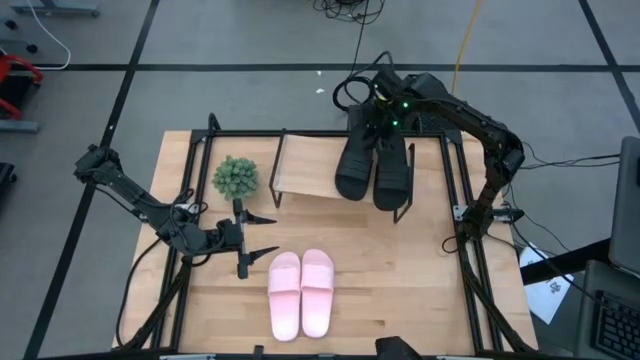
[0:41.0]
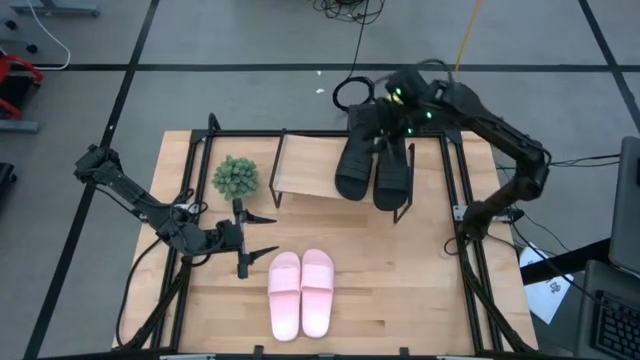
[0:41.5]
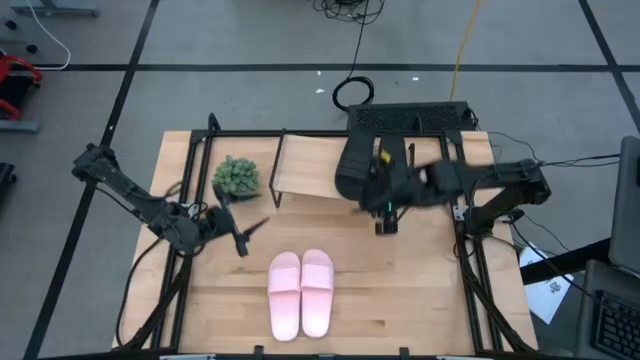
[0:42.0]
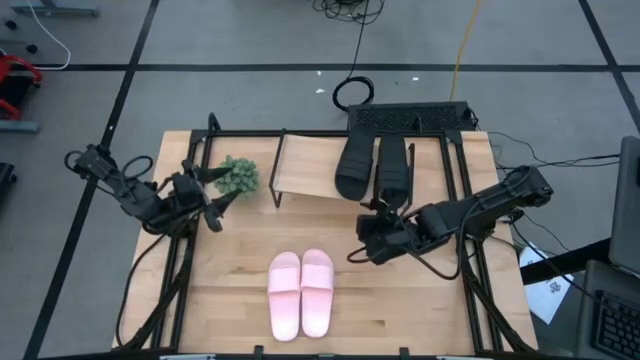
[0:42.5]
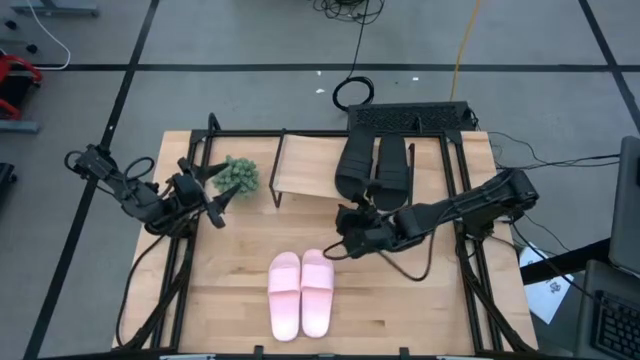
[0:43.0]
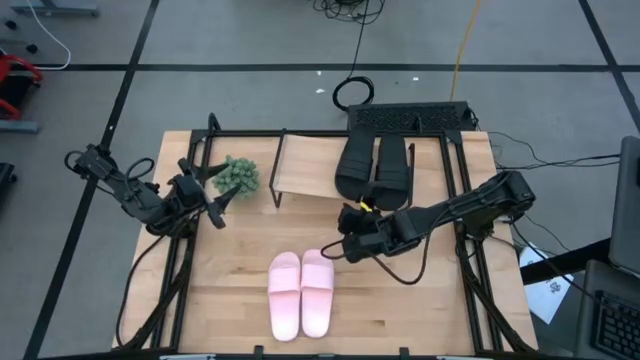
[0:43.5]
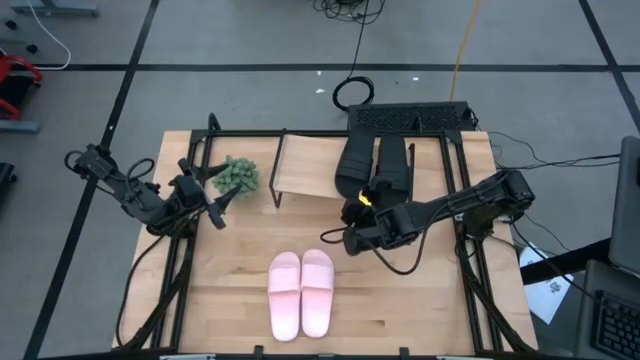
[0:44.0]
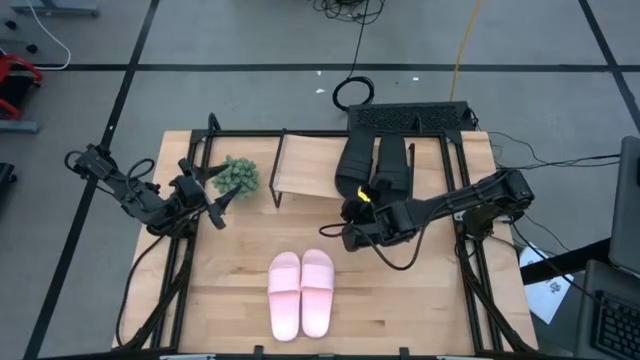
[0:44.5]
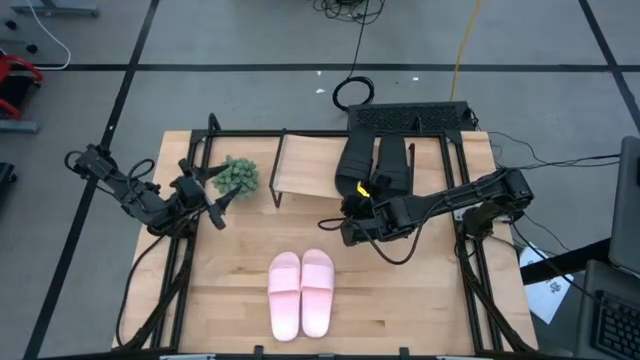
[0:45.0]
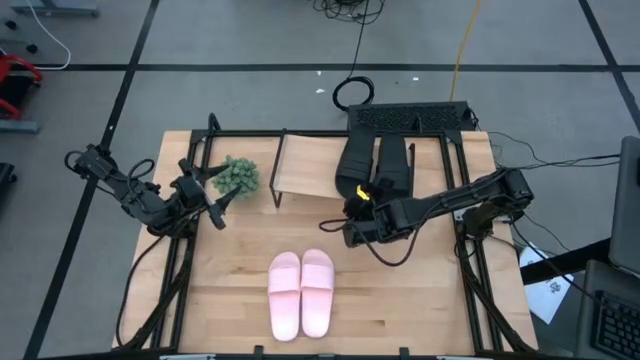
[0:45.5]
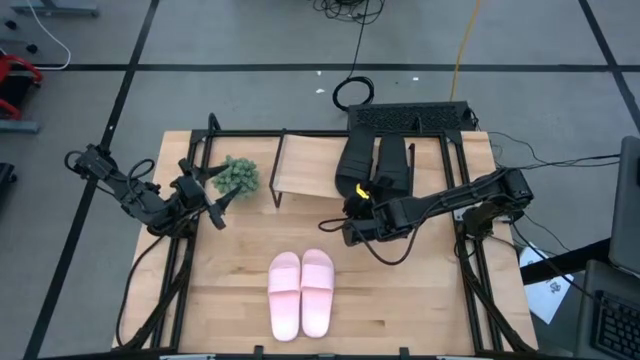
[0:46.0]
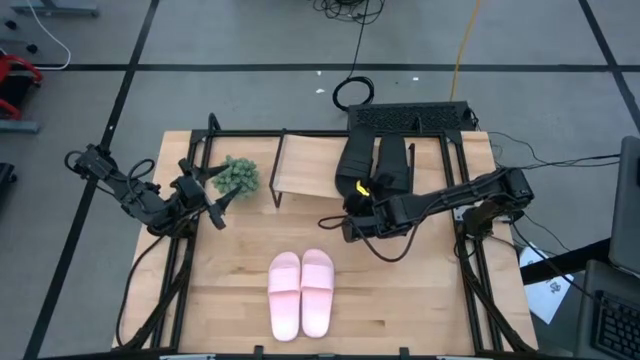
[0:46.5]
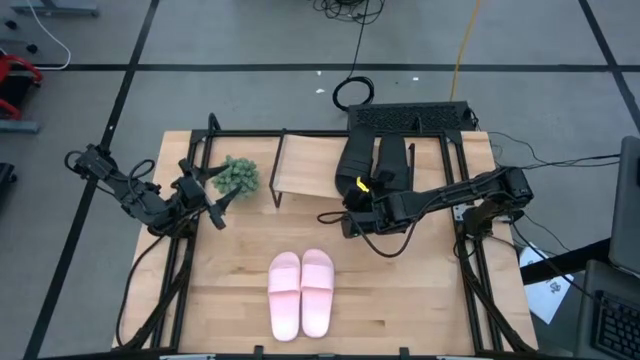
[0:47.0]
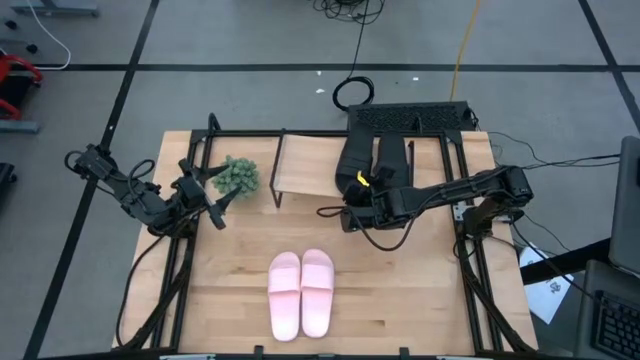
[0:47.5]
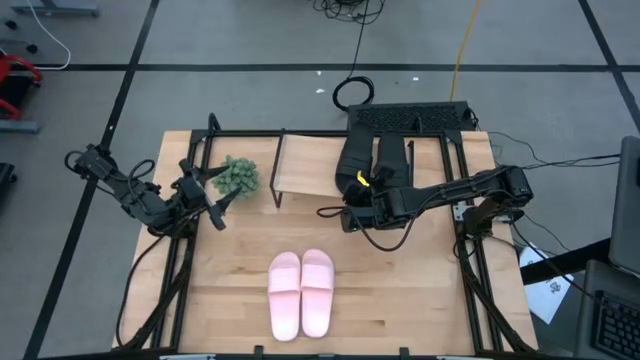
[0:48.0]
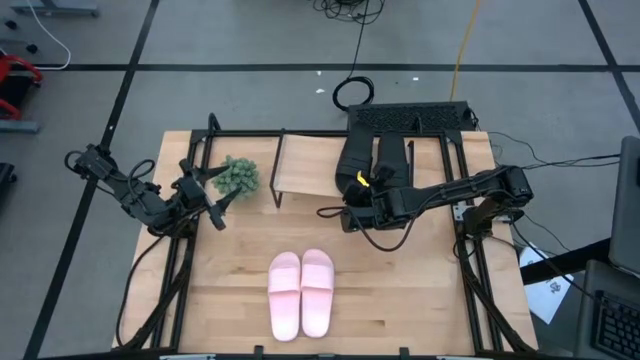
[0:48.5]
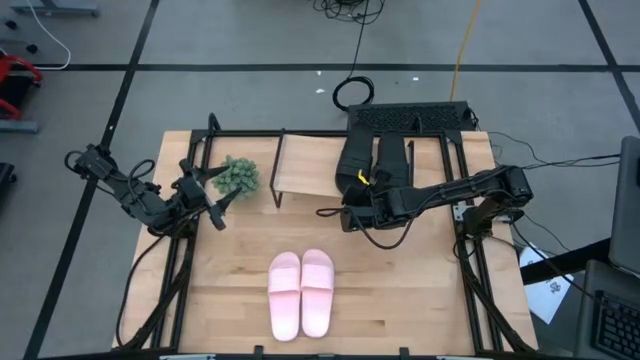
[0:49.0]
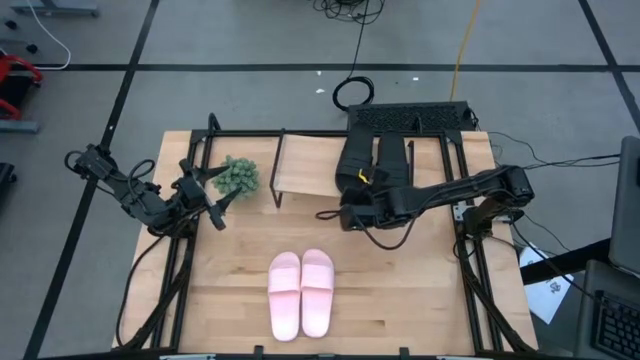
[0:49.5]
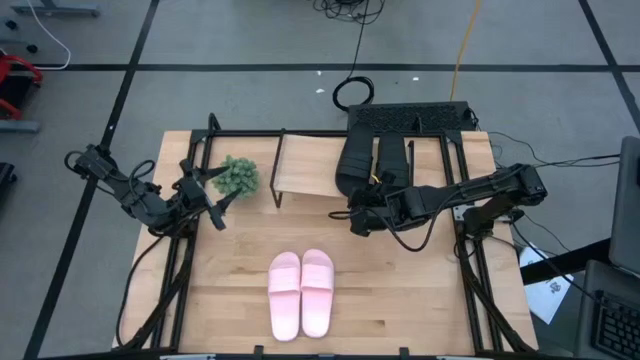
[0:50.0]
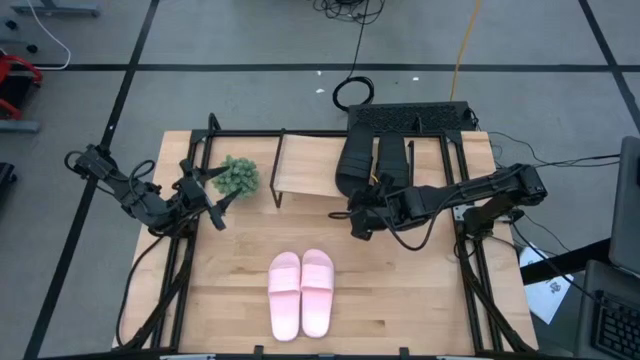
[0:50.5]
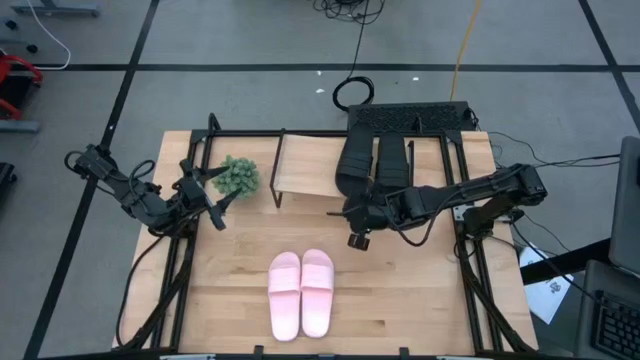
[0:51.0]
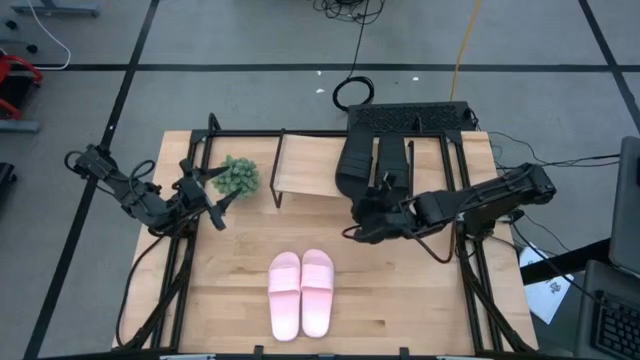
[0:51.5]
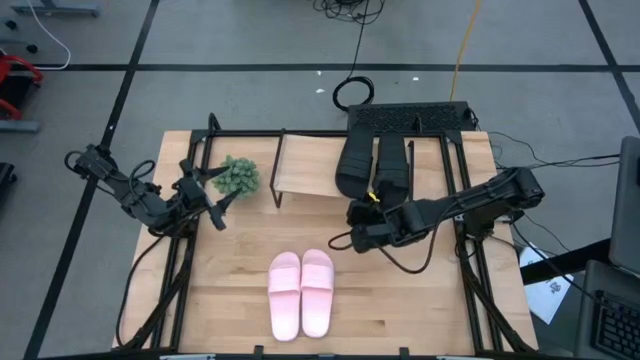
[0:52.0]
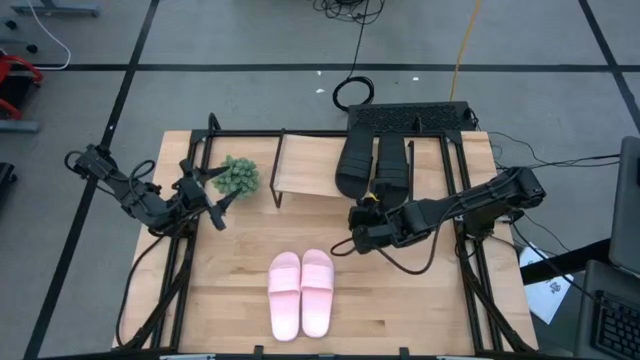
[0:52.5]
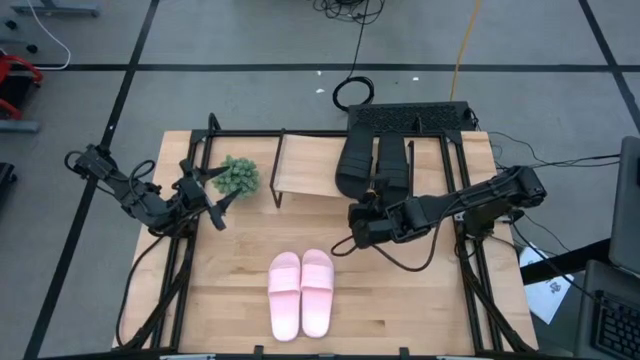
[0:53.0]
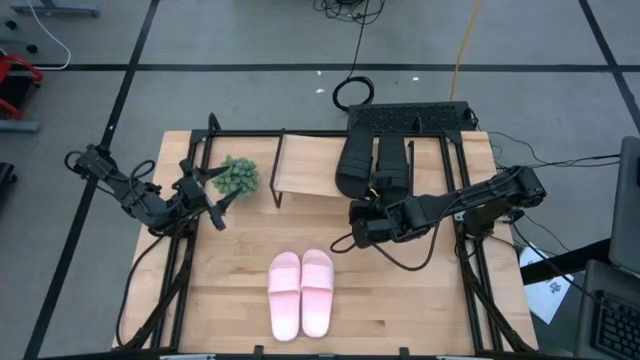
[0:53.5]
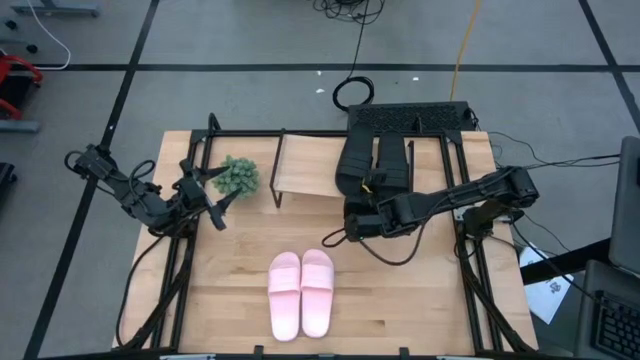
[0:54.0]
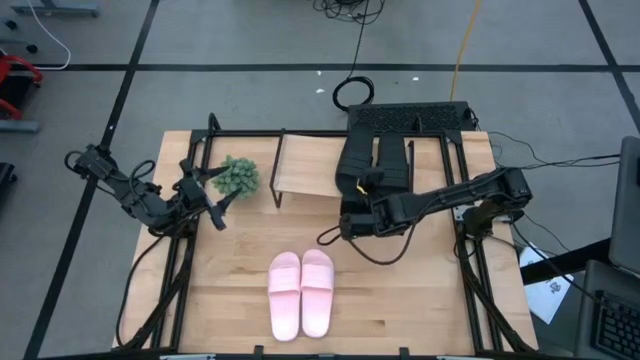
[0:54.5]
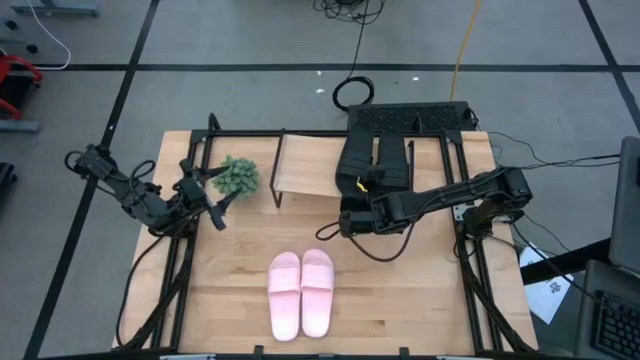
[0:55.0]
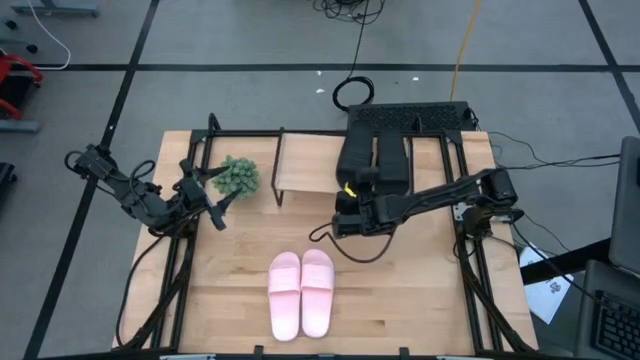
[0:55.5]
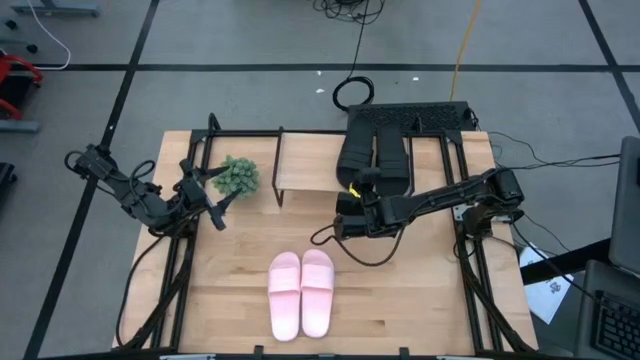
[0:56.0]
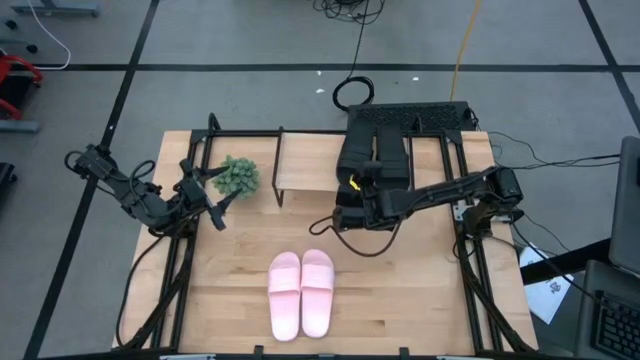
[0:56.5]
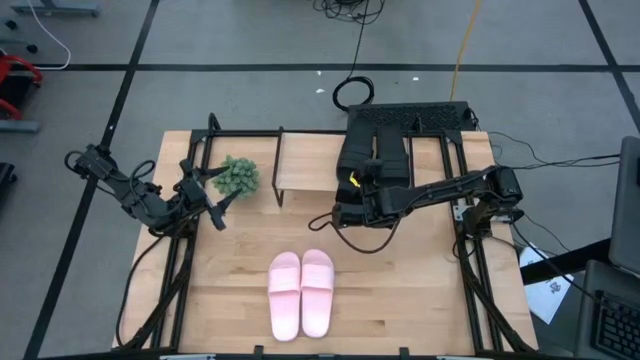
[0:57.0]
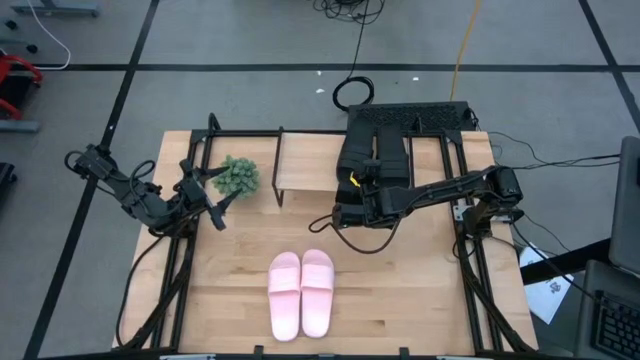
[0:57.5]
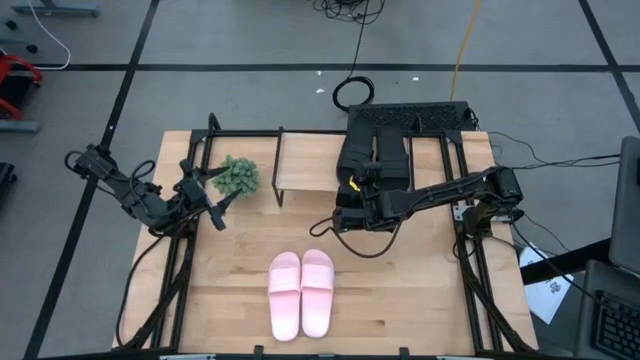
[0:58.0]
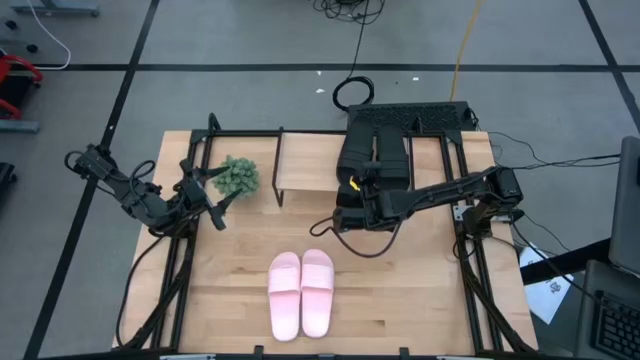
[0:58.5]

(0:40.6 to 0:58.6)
Task: Pick and place slides into the shelf
Adjust the black slipper on the shelf

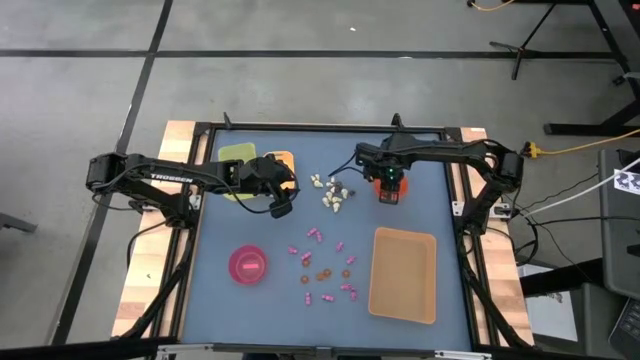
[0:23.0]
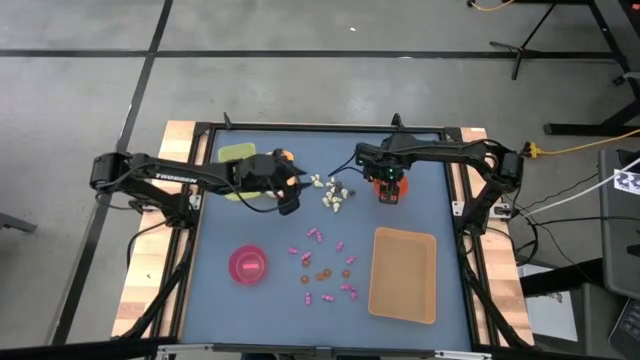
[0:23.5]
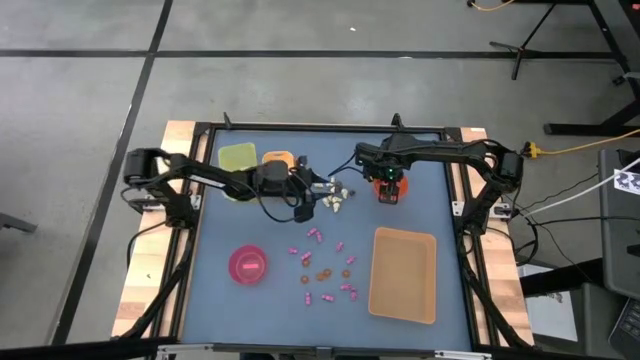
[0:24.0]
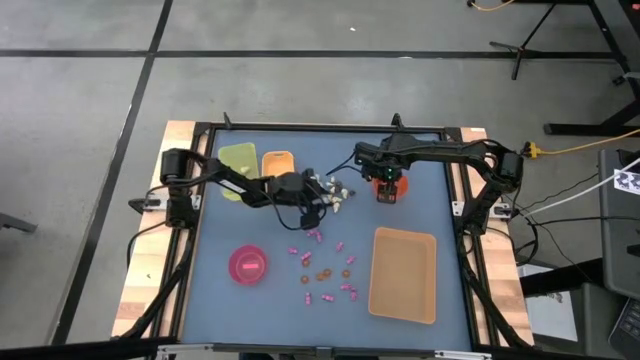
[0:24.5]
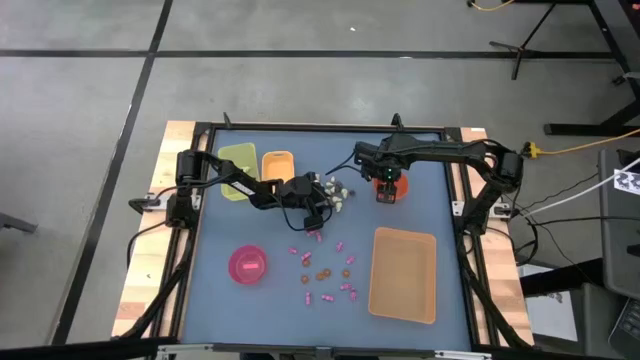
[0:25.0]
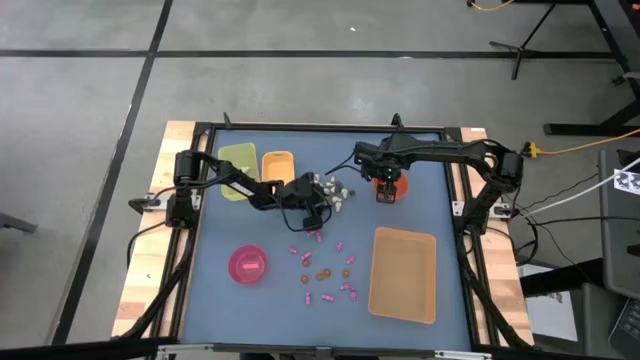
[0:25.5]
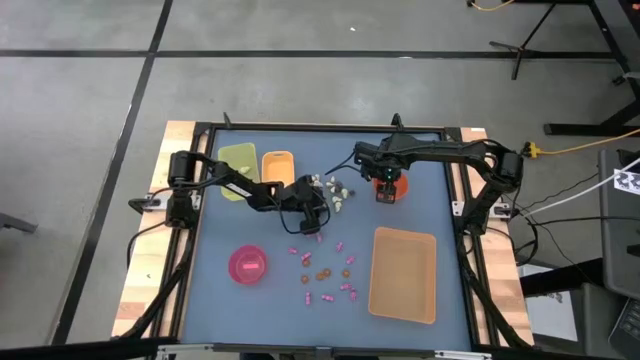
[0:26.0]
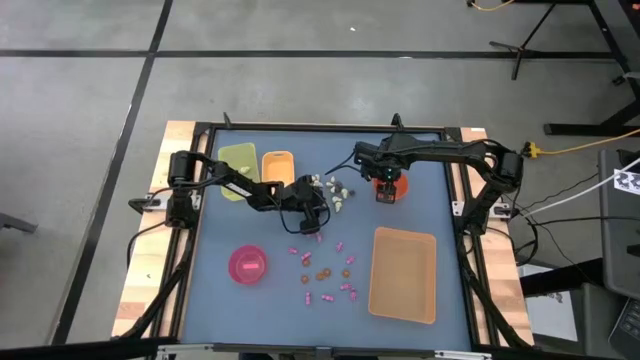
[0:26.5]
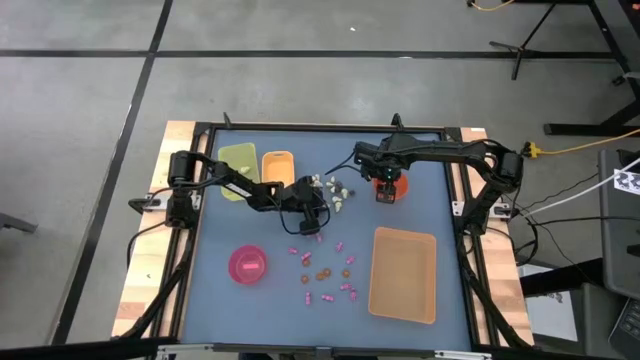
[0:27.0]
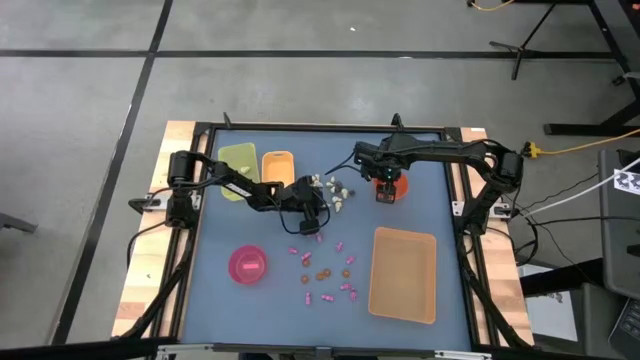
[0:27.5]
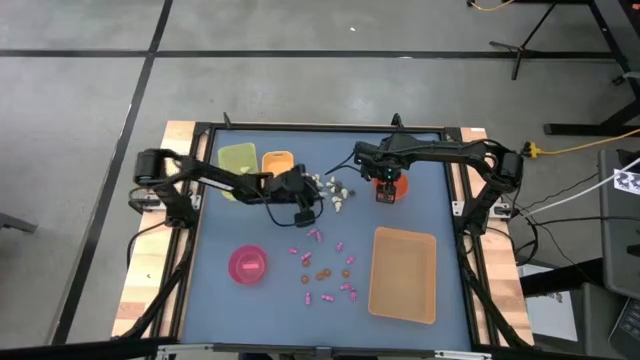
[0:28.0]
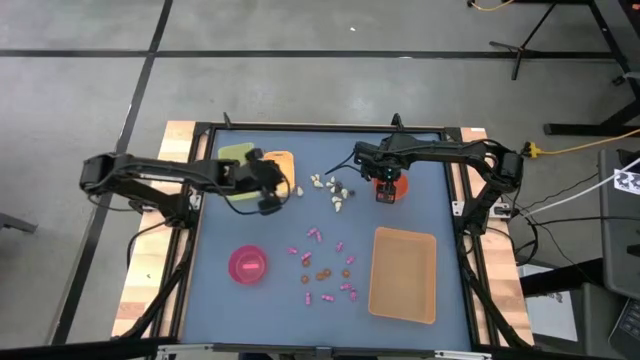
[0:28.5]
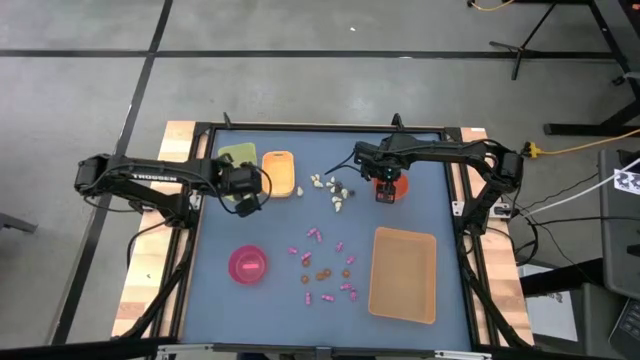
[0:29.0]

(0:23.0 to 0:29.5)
Task: Sort Halloween decoration
Put the white skull toy into the yellow bin
